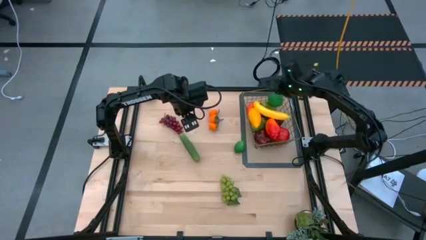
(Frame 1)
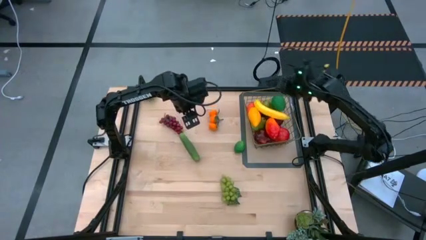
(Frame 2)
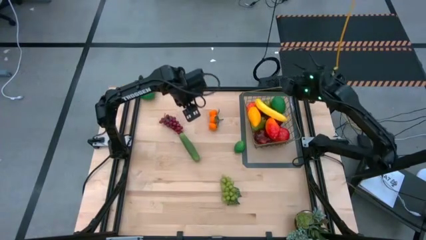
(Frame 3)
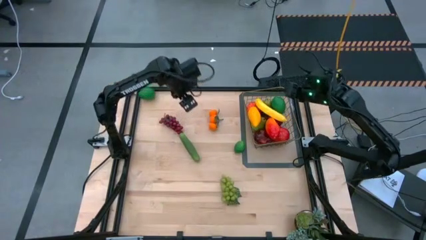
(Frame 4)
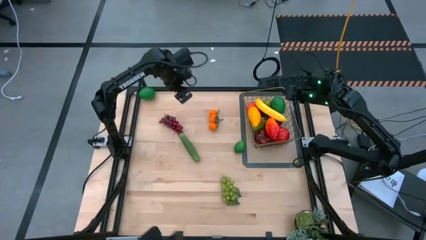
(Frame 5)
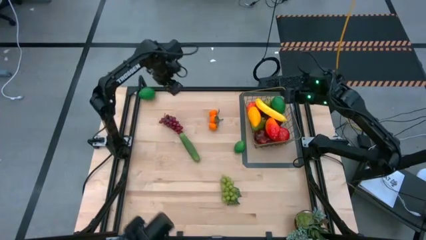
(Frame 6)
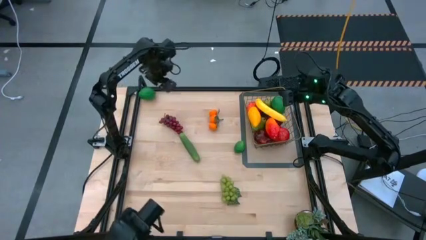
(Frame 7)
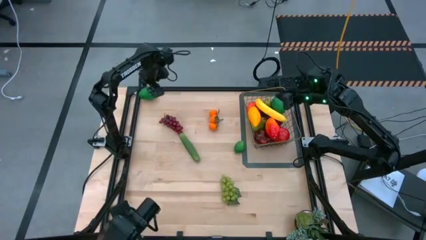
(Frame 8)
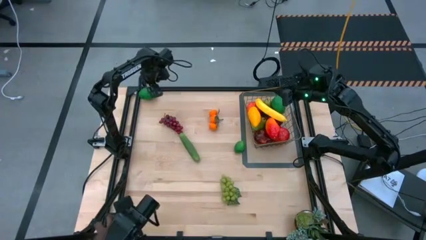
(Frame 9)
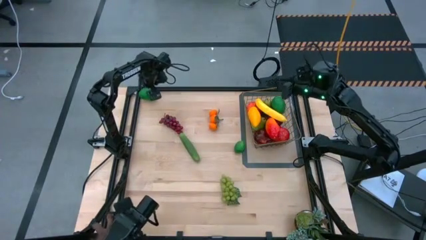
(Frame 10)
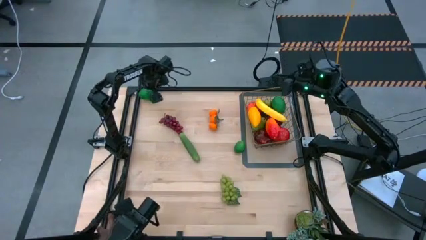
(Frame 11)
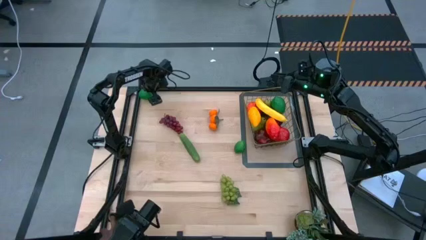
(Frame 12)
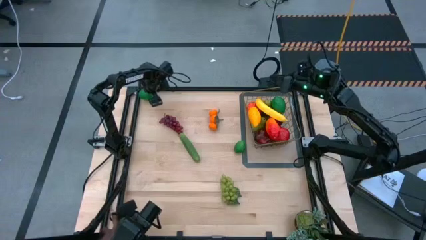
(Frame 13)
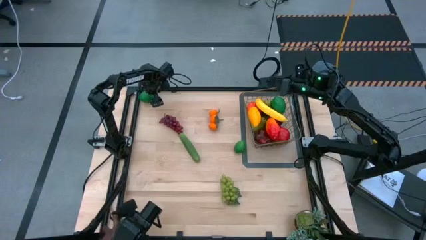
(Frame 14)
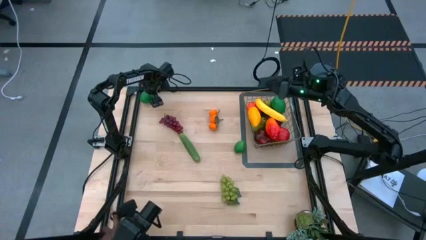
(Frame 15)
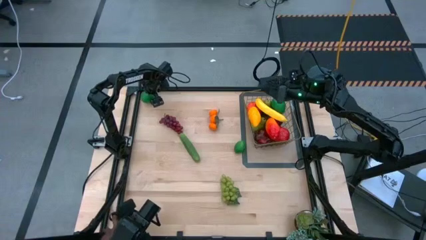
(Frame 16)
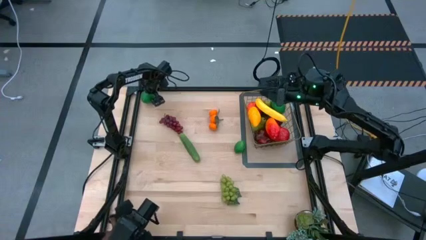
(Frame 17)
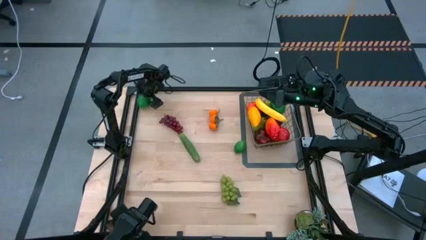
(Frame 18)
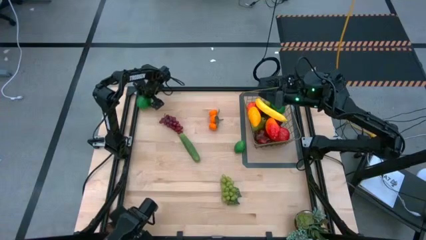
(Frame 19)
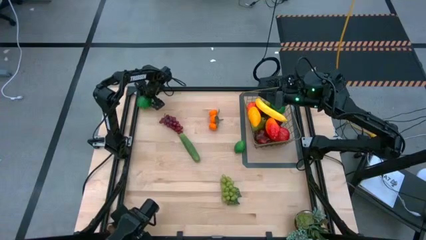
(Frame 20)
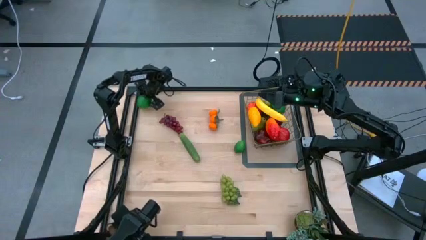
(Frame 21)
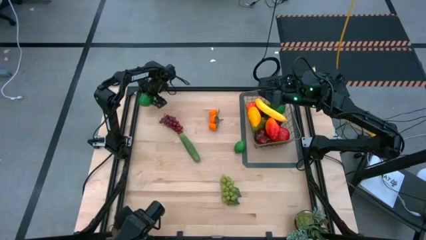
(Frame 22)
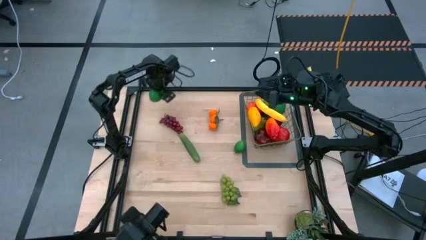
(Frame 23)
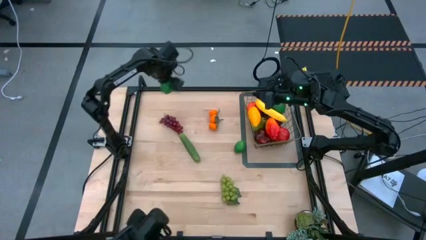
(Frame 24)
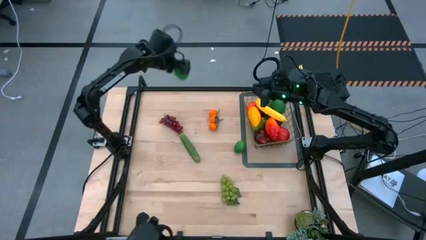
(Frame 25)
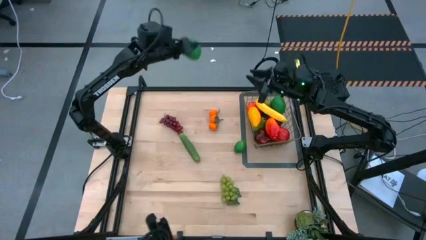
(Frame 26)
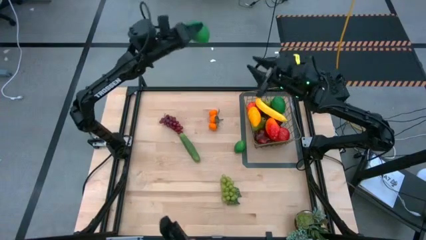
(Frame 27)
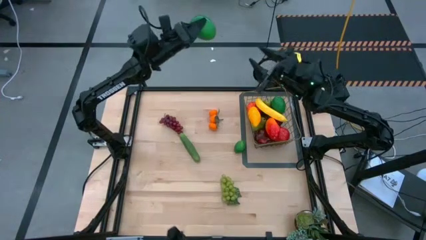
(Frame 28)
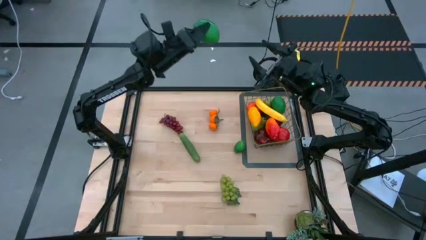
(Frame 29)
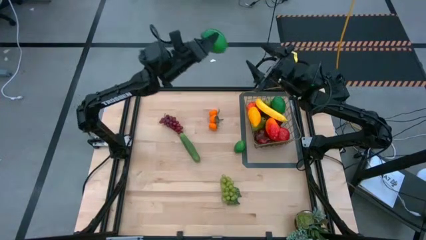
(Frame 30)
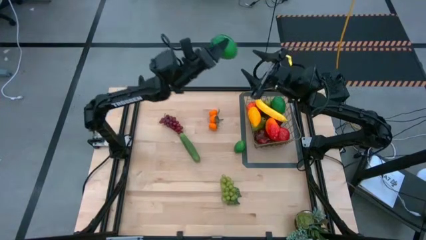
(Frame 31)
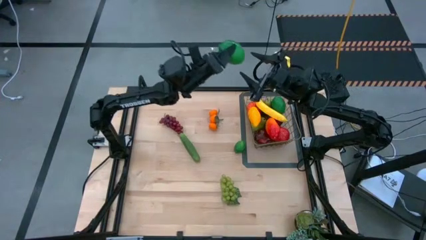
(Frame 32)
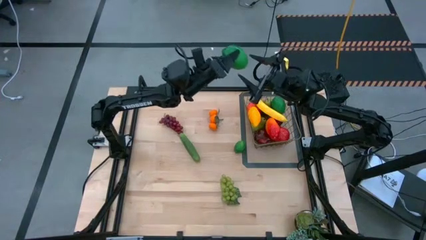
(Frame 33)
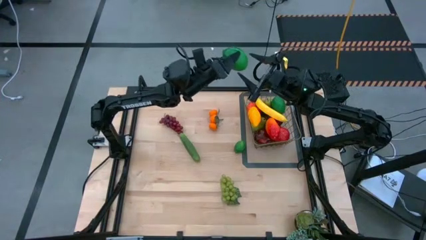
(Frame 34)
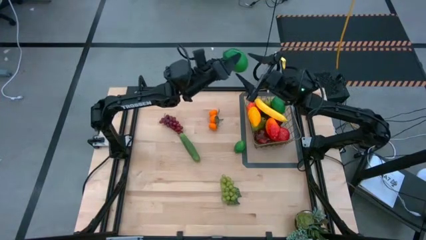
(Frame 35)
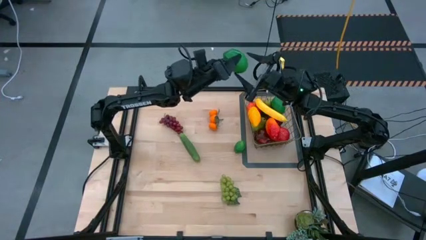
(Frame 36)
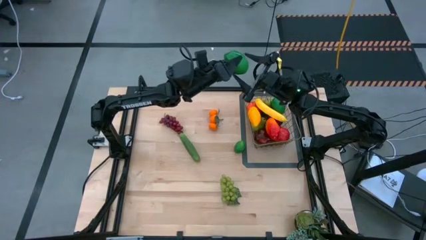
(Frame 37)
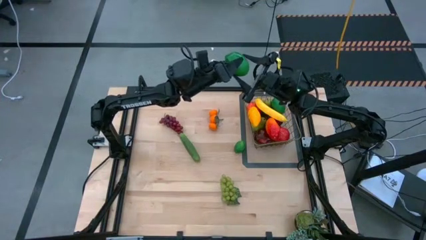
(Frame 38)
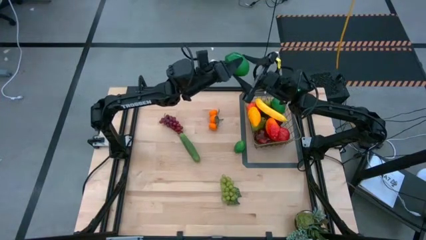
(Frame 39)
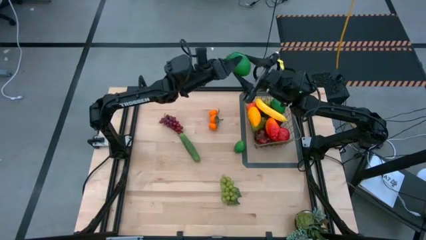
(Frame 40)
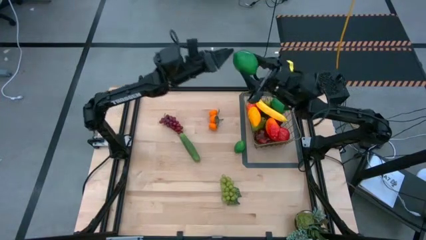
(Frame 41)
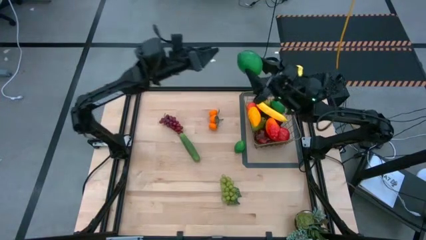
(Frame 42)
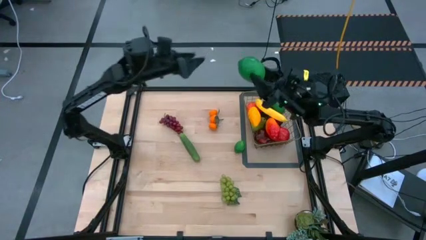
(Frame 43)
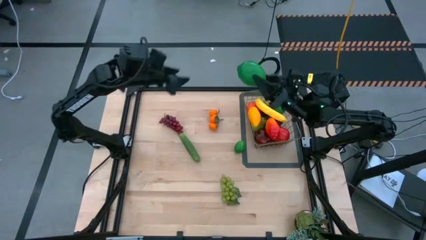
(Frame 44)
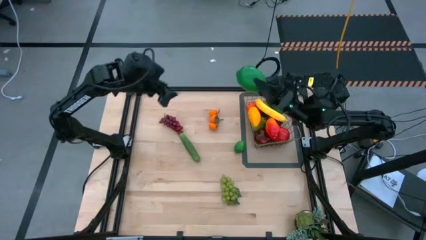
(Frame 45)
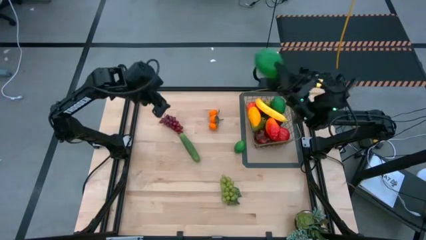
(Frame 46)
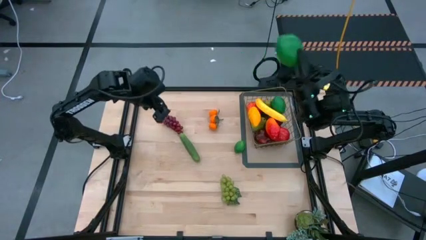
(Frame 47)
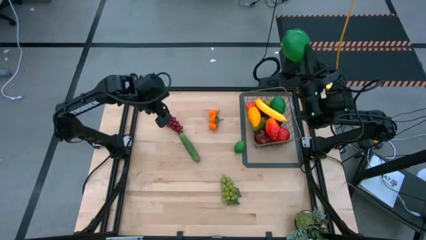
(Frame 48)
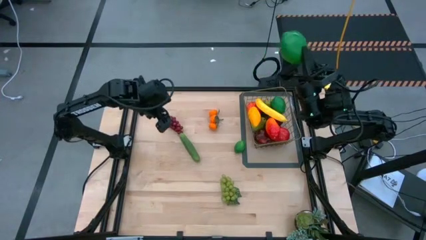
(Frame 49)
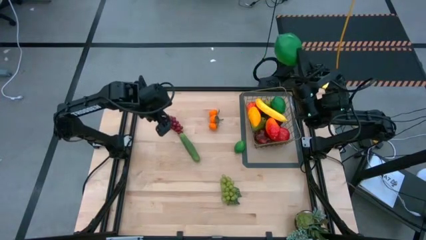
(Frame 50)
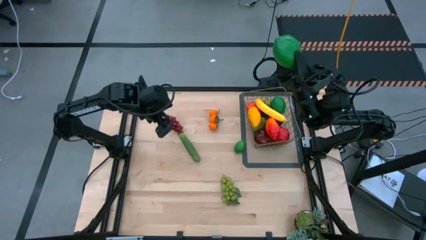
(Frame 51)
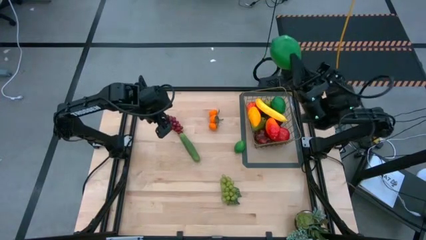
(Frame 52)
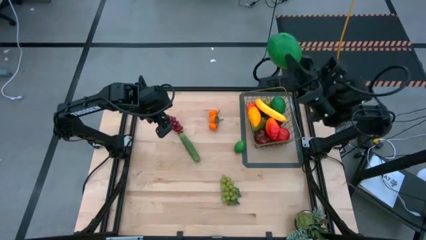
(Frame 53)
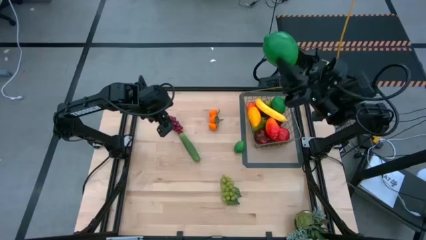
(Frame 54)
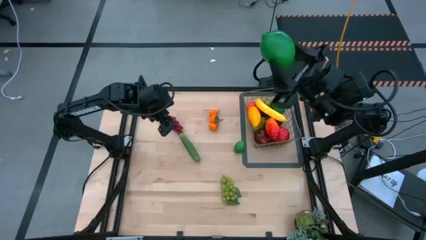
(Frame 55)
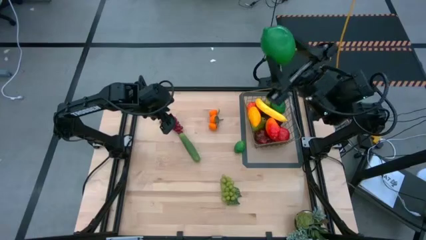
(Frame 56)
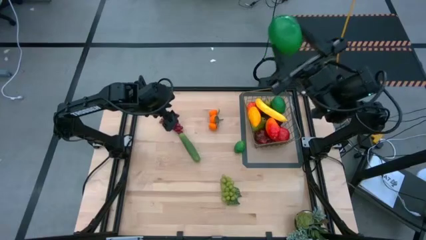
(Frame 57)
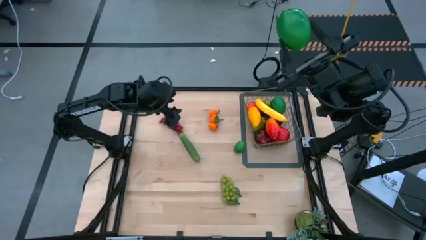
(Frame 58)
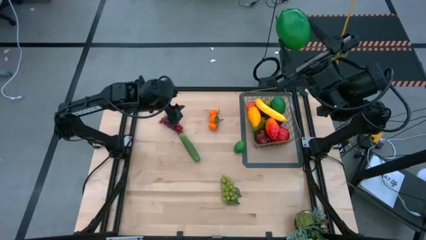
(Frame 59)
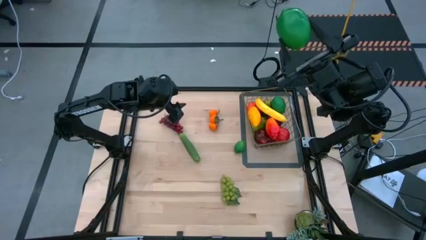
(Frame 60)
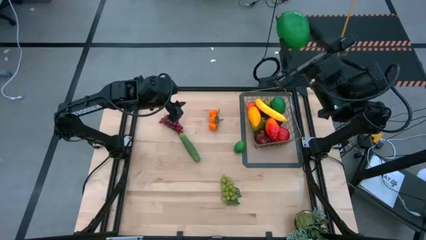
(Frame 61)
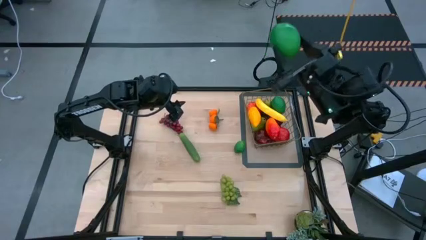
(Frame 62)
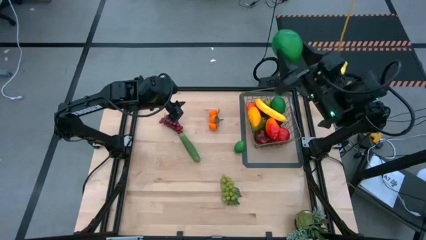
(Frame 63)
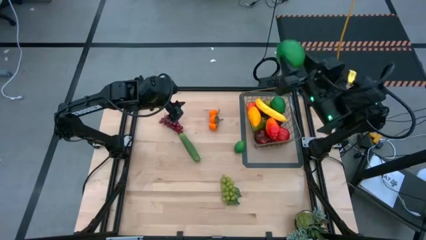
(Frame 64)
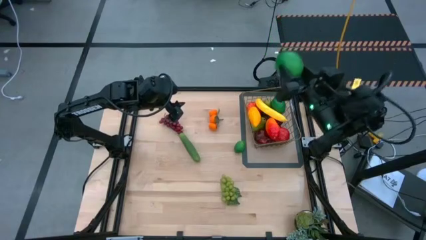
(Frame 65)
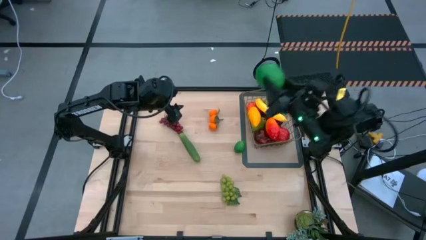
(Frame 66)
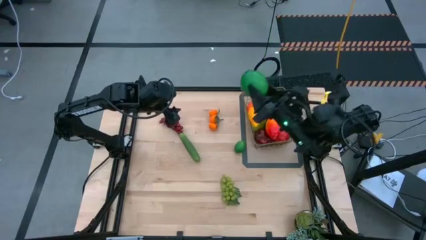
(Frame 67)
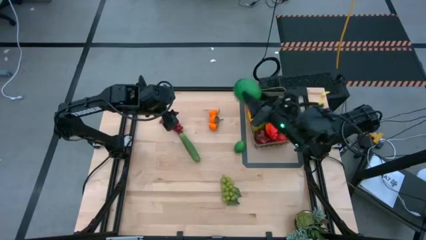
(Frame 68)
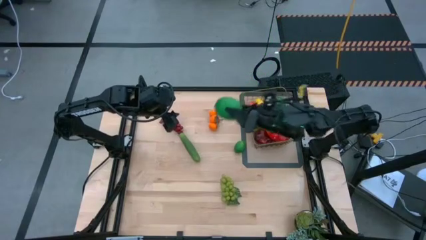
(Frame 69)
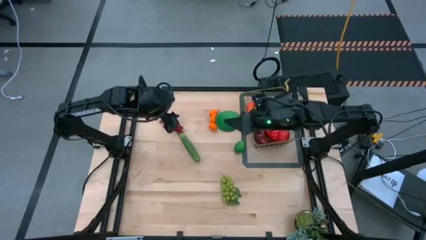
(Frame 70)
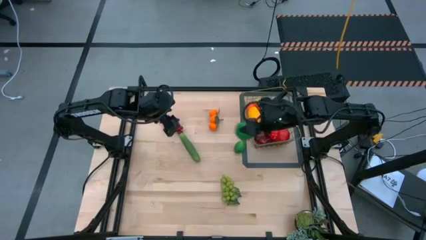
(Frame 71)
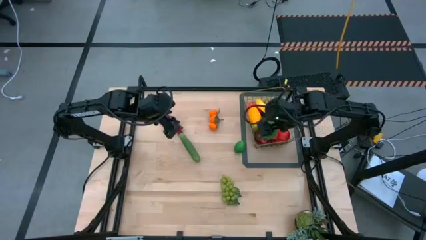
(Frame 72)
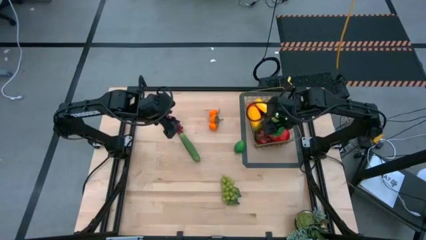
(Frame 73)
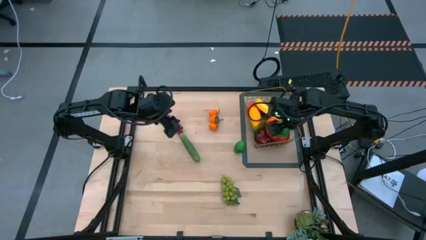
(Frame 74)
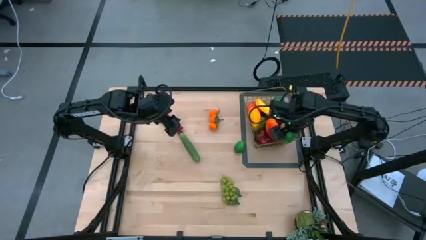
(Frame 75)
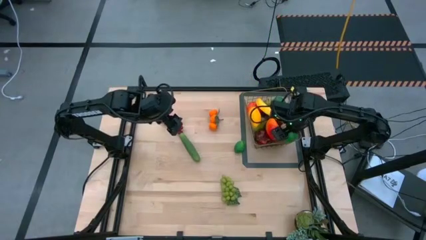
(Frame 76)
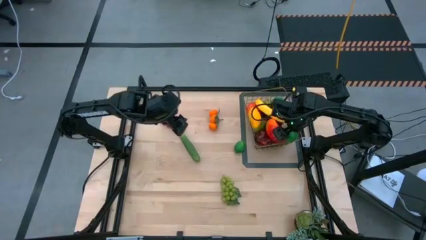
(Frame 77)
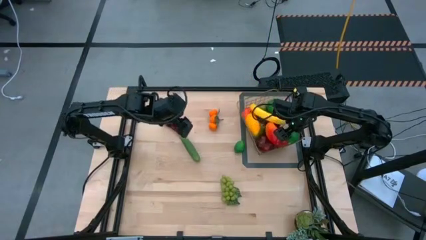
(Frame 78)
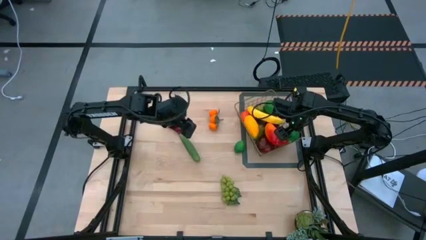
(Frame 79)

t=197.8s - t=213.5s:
Task: Build produce basket
Put the top green lime into the wire basket

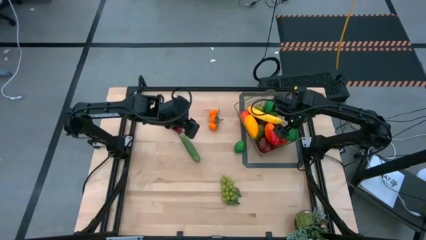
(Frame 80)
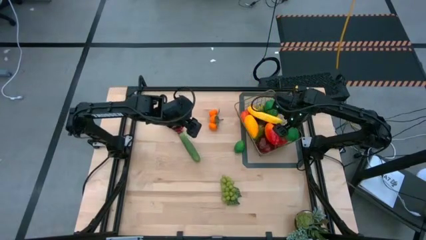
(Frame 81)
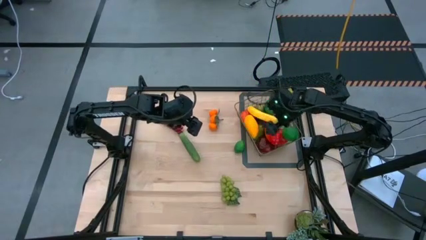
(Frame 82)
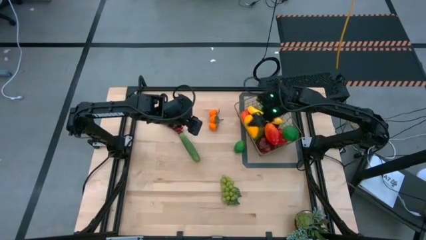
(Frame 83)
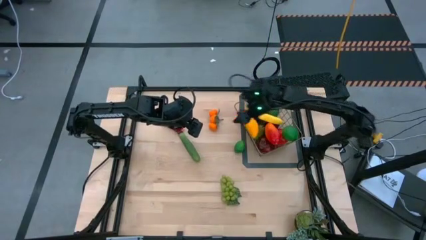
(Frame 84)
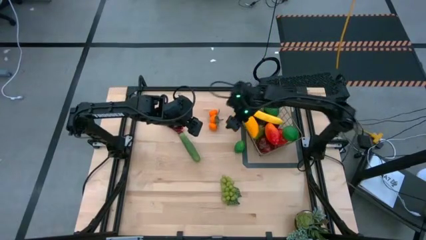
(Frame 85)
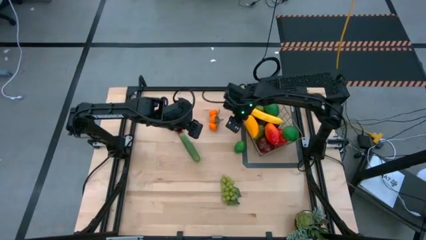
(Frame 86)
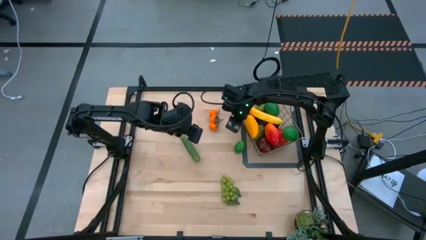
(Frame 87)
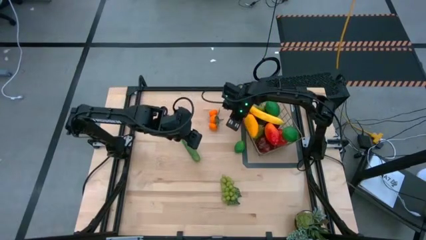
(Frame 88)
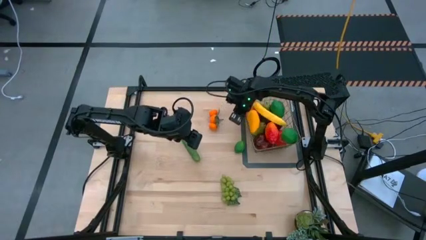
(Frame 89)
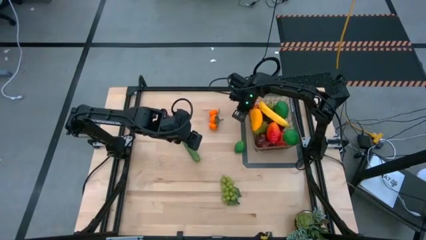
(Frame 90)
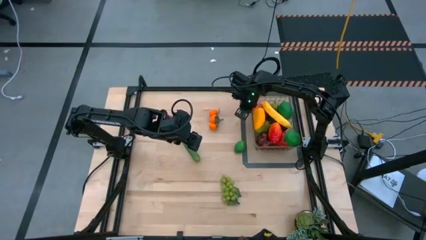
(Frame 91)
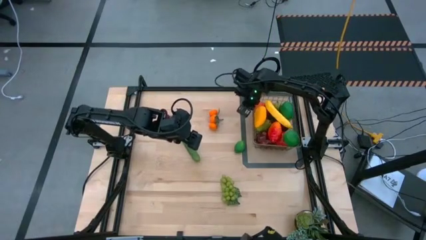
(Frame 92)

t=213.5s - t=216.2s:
Adjust the wire basket

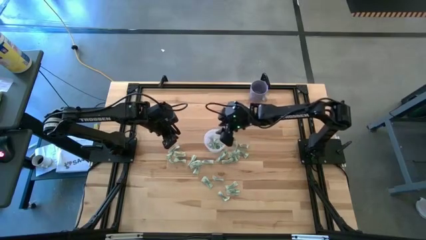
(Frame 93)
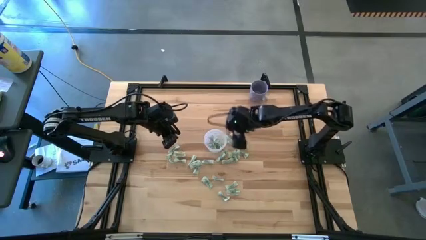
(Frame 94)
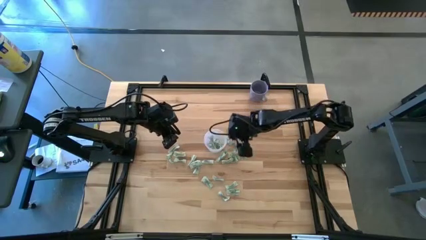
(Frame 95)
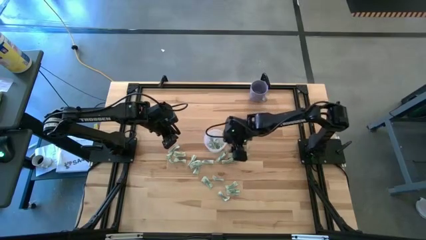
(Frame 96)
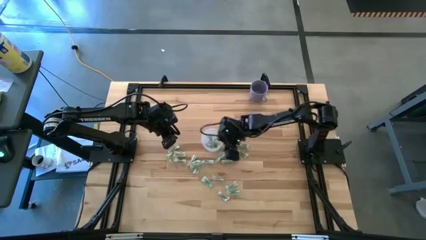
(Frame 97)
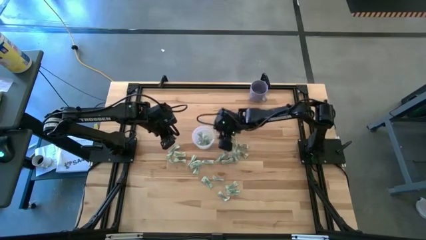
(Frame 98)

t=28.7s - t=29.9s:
Task: Pick and place Stevia / Truvia into bins
Adjust the transparent container
